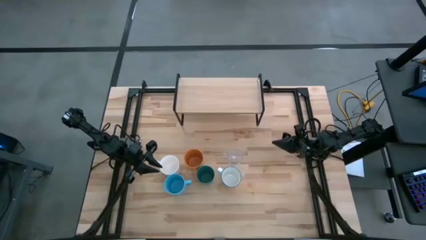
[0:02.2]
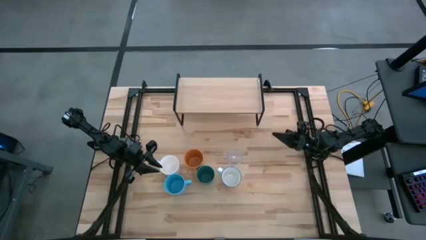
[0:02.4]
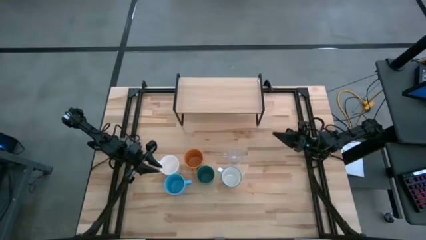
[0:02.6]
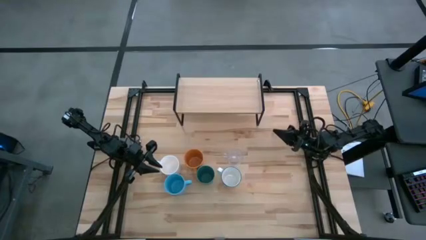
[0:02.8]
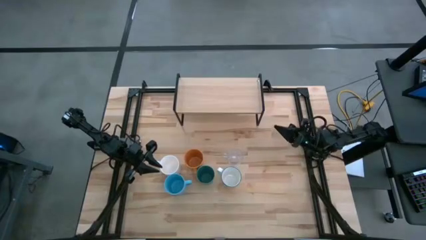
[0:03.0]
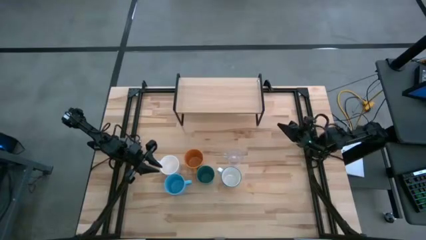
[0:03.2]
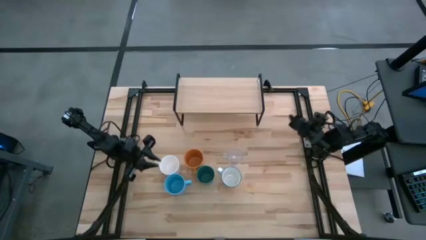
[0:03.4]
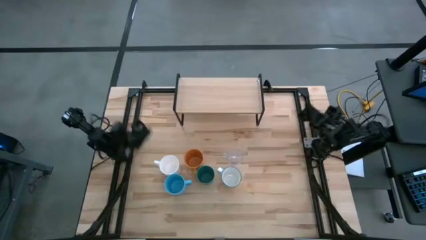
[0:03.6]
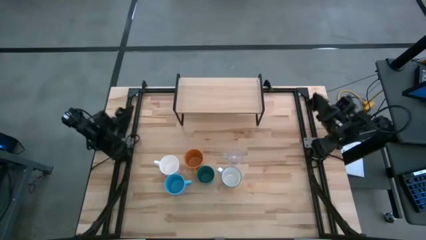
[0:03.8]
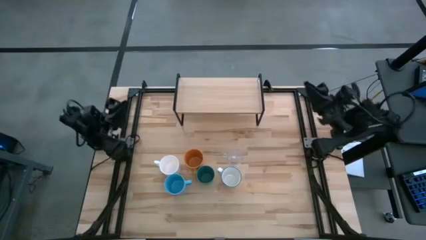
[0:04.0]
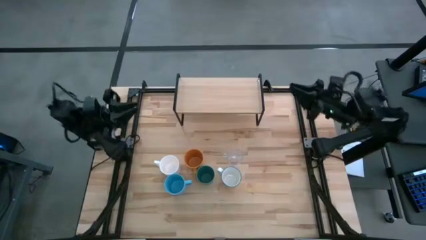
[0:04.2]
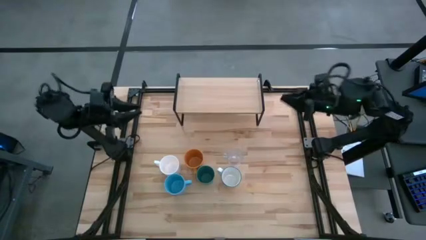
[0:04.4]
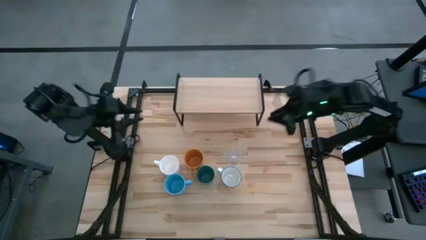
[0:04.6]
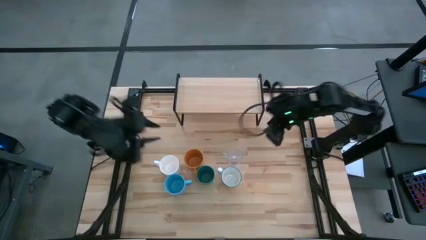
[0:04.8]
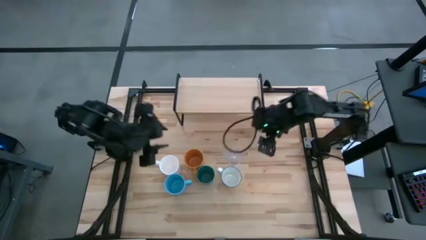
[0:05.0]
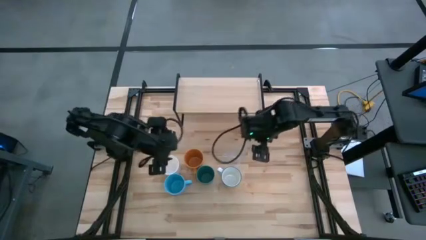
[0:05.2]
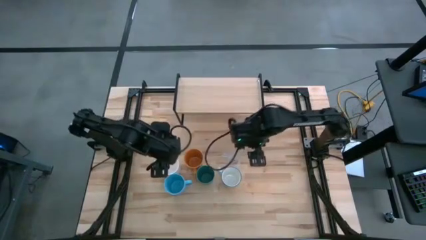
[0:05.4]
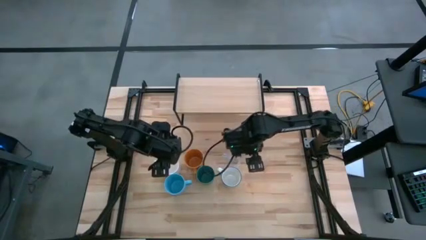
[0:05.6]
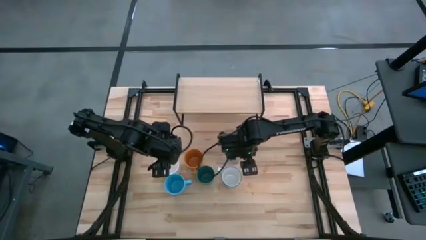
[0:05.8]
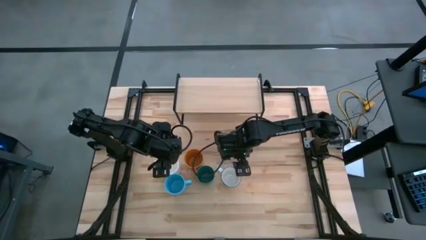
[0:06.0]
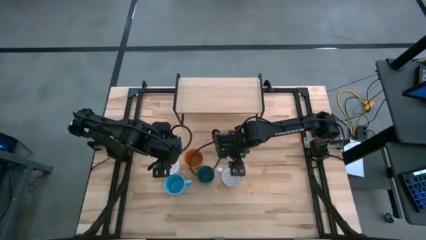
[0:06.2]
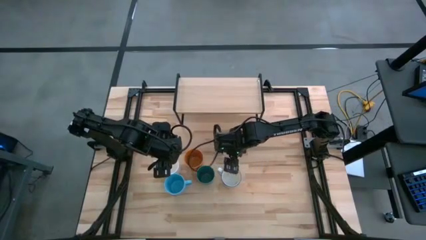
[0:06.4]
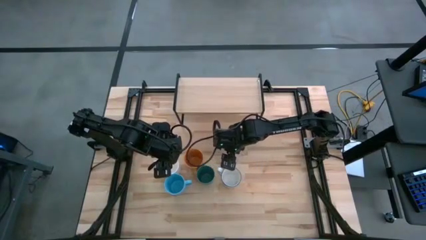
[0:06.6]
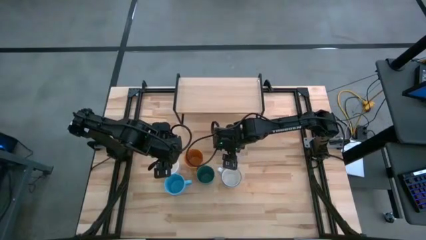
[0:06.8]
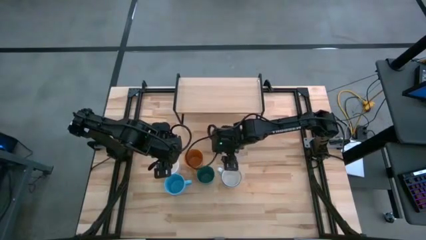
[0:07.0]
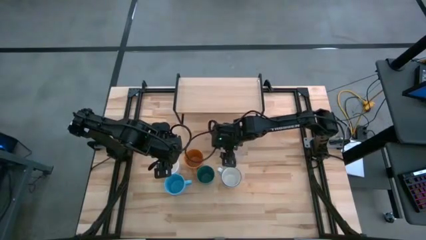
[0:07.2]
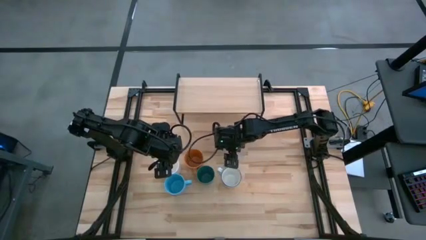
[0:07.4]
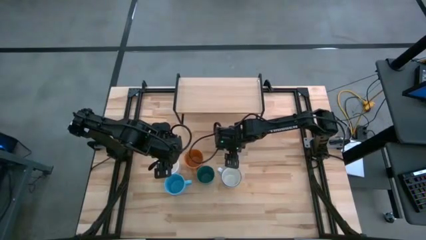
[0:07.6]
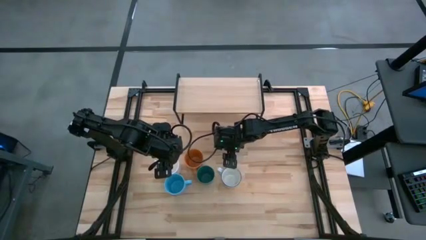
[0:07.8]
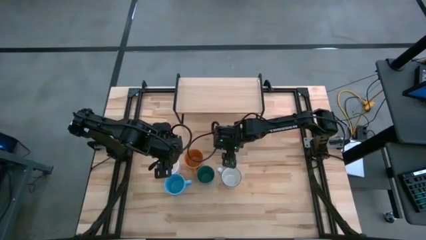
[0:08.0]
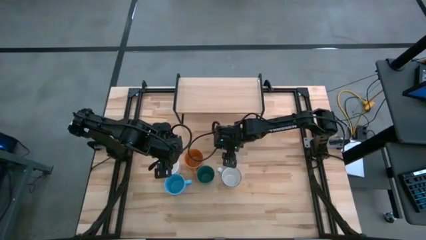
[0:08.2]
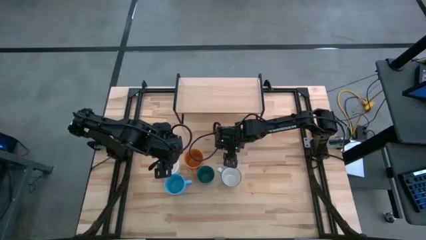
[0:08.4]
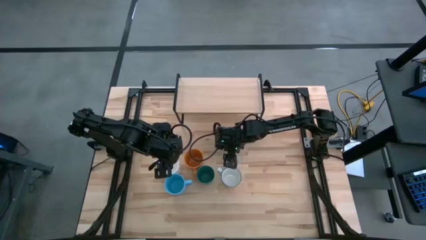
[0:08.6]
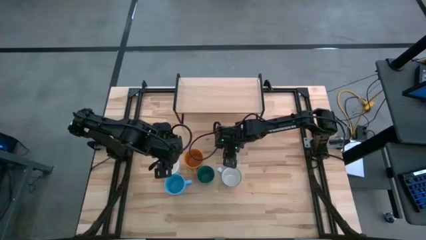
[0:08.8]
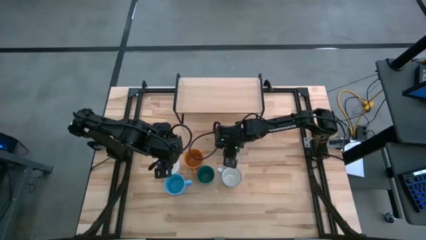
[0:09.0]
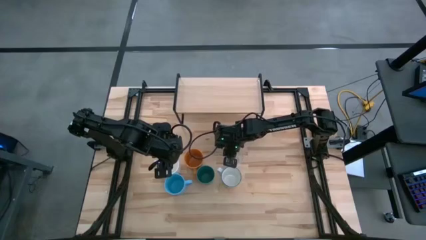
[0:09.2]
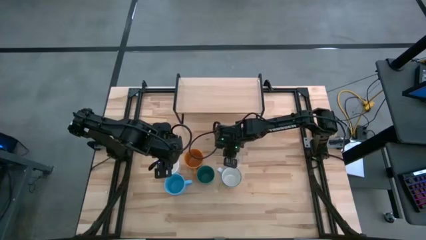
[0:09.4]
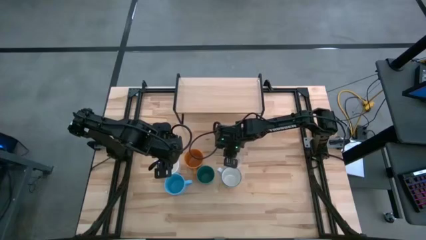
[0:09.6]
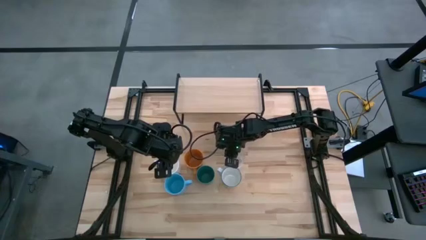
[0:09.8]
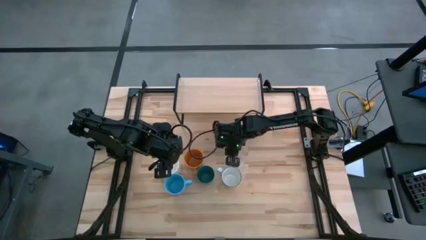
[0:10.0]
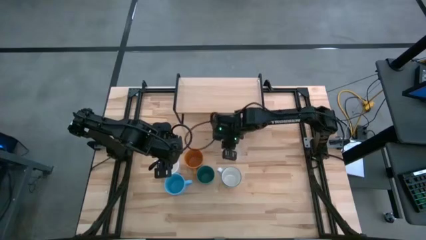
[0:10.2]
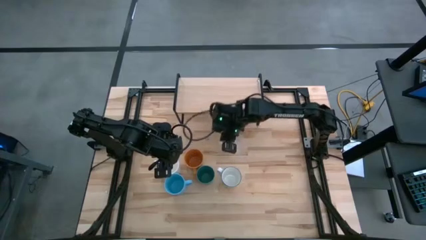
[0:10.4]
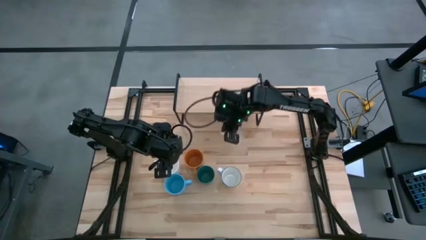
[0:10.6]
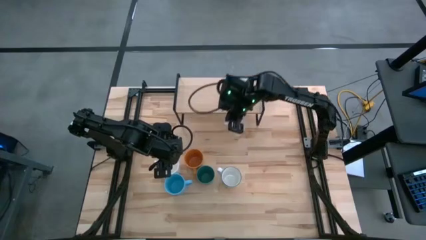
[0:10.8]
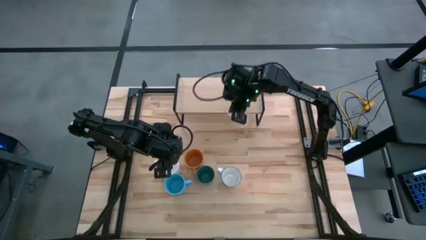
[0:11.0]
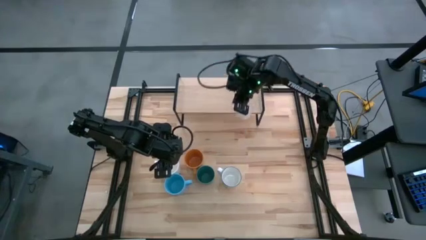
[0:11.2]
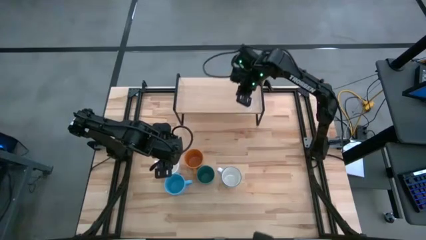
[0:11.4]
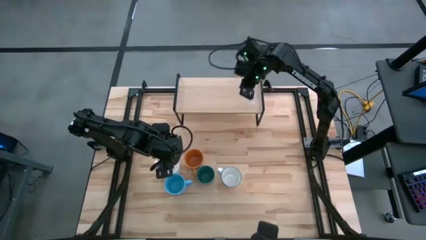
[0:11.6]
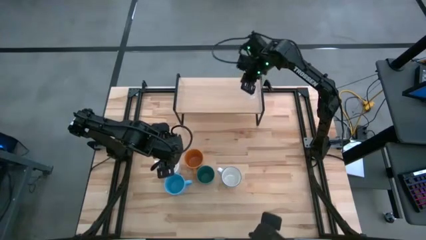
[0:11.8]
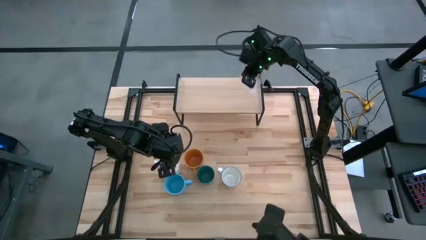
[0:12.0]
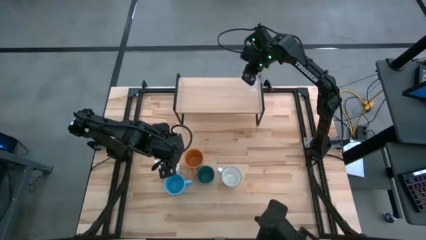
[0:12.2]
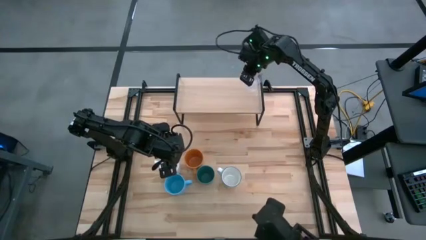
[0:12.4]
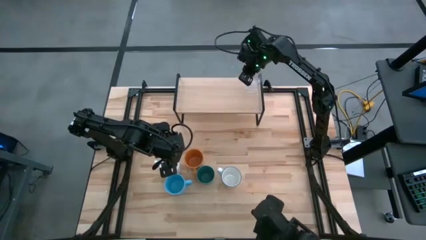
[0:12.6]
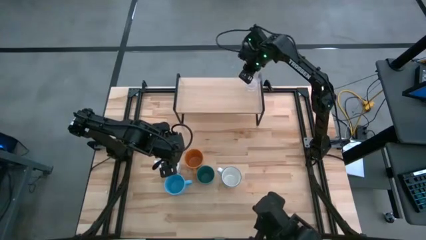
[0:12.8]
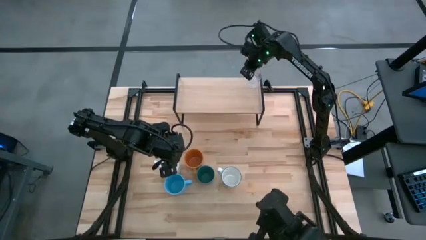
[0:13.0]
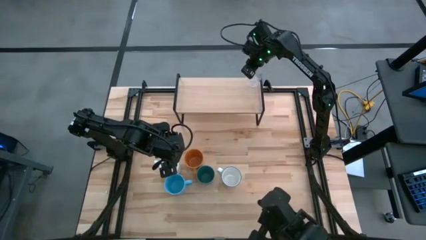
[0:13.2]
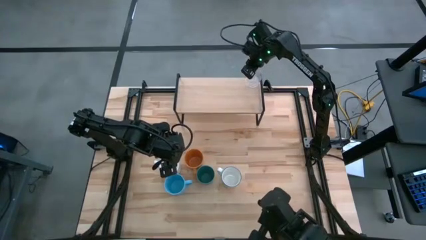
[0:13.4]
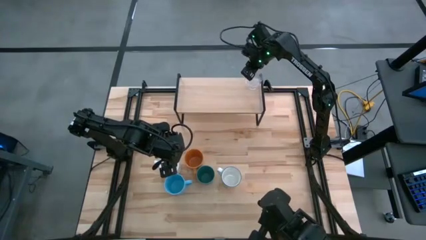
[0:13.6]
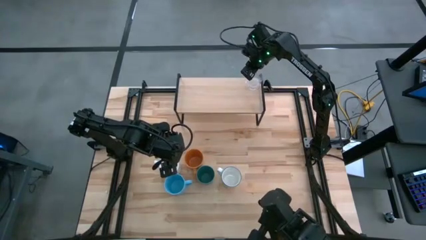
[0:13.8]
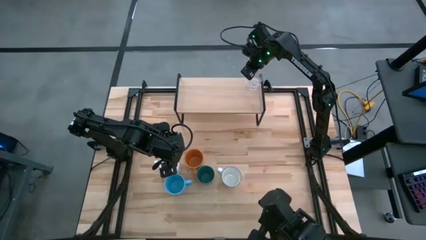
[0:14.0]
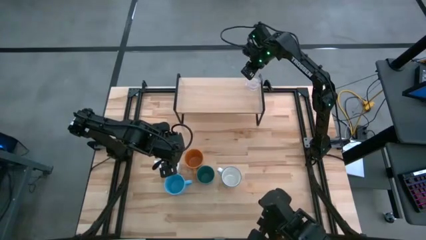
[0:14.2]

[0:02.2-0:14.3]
Task: Stack small to large cups/mugs on shelf
Put the transparent mug on the shelf
